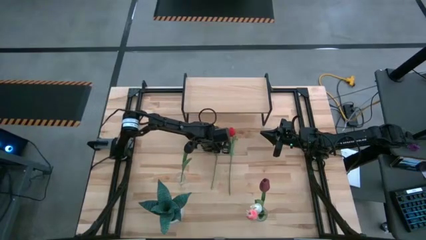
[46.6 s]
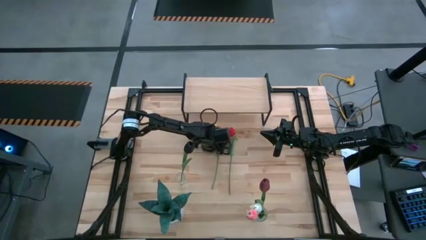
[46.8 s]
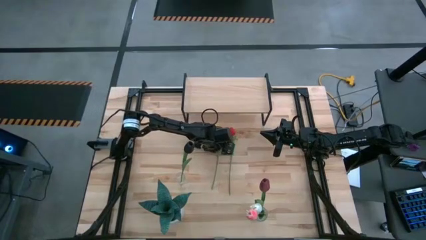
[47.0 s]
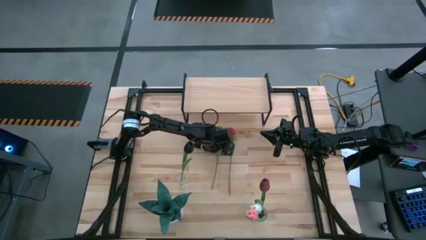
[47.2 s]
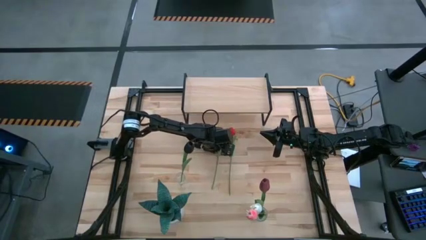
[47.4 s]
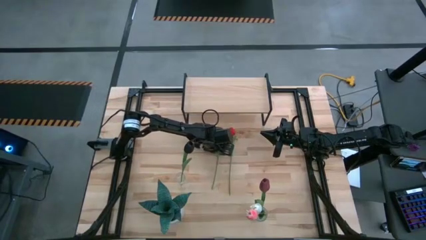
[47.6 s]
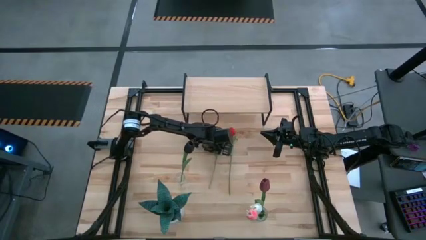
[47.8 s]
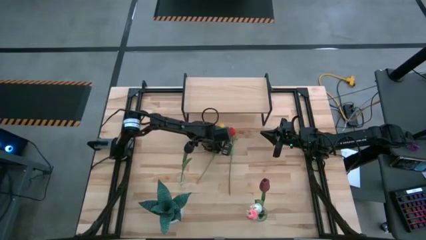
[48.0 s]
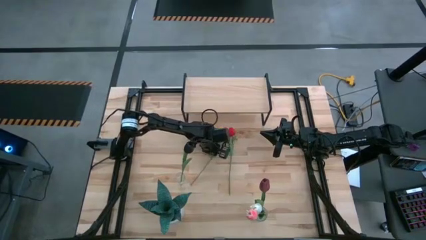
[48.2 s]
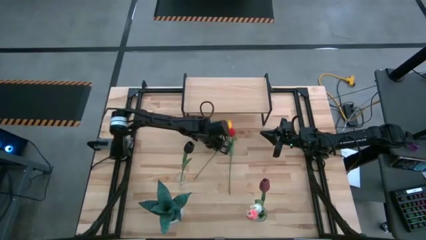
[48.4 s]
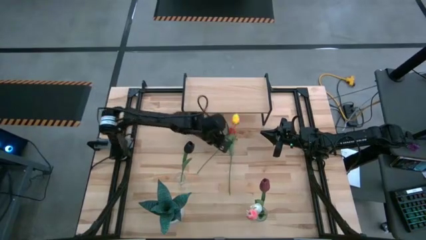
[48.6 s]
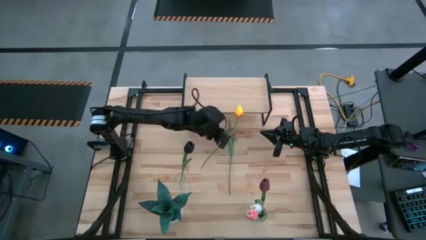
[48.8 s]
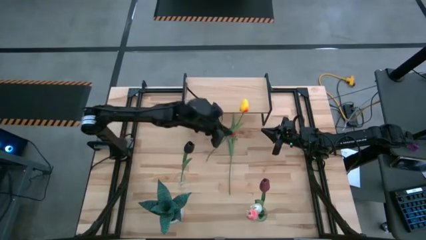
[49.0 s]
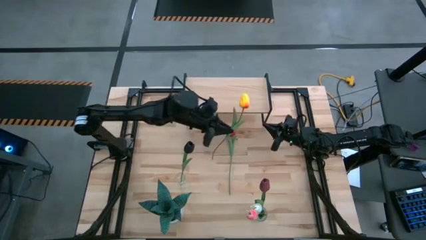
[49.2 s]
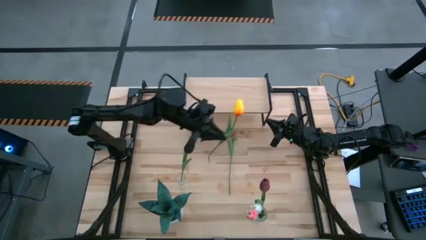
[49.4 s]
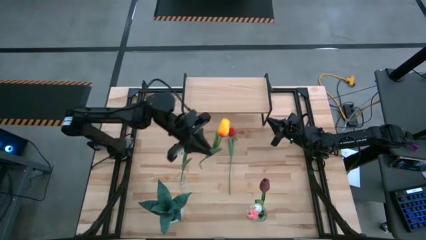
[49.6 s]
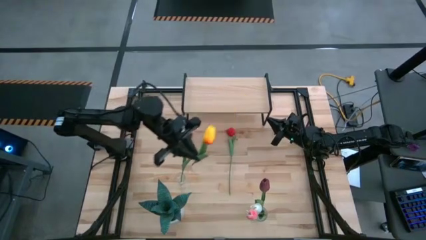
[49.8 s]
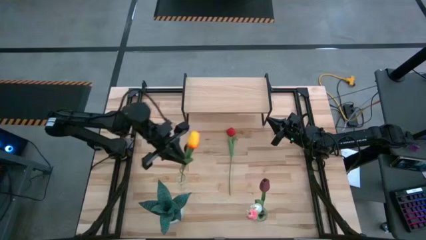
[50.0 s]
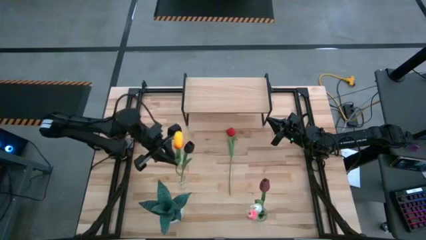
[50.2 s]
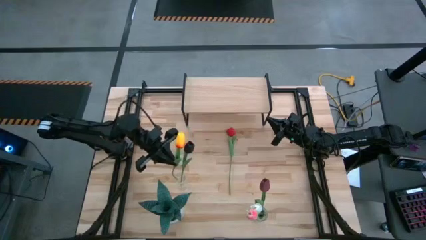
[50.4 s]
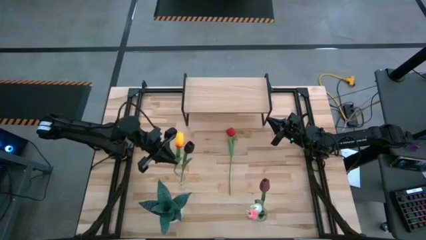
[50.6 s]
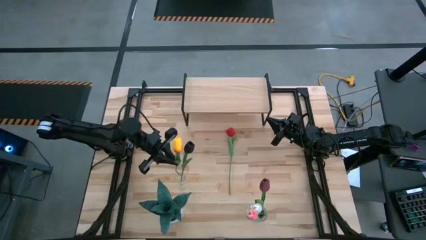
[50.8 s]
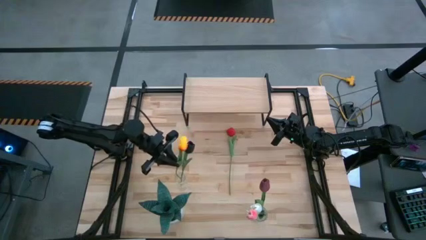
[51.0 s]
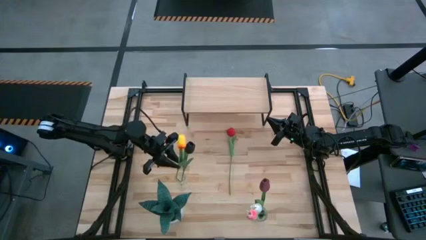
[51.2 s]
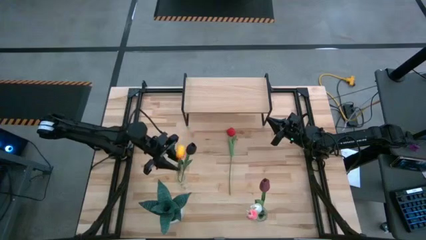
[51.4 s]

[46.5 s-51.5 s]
Task: Pick and place flowers into a vace then onto a shelf
Put the yellow flower into the top transparent vase

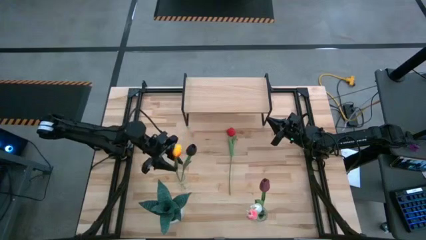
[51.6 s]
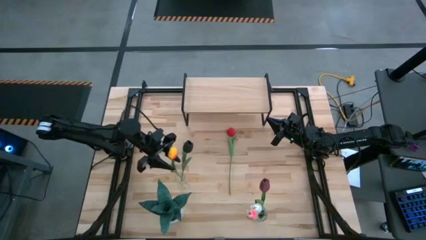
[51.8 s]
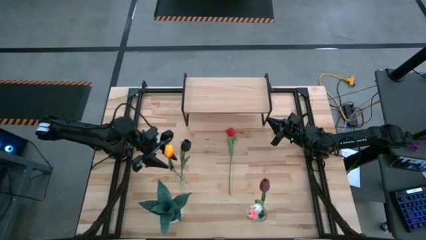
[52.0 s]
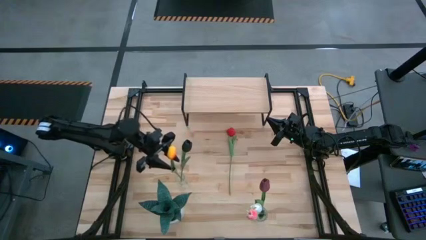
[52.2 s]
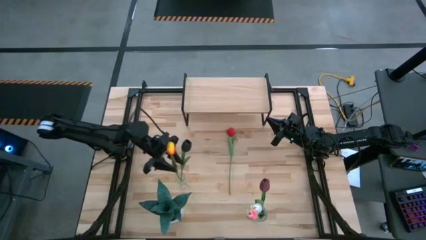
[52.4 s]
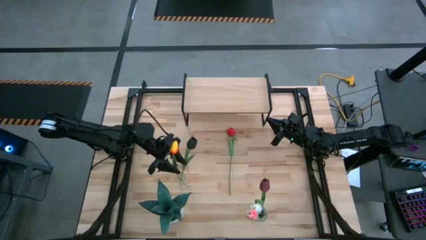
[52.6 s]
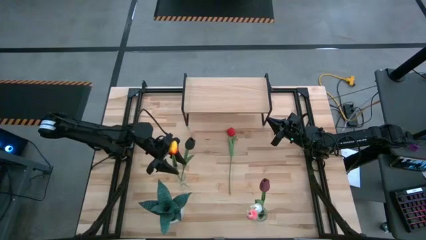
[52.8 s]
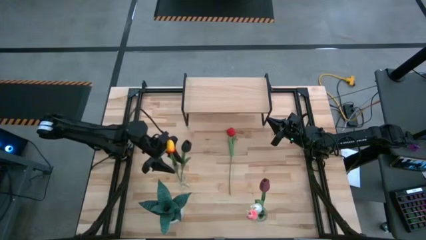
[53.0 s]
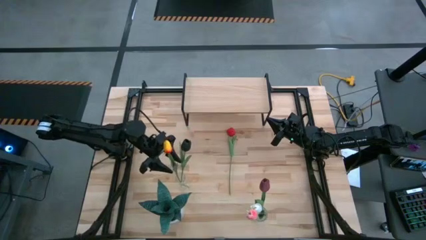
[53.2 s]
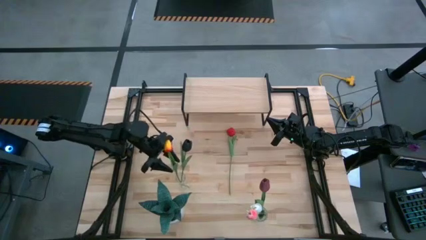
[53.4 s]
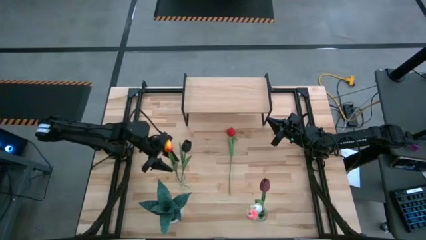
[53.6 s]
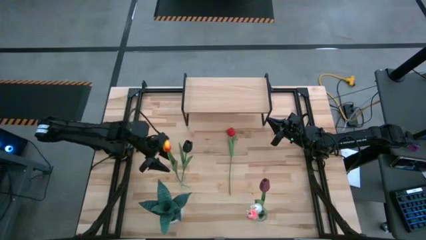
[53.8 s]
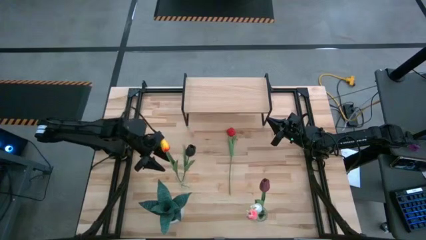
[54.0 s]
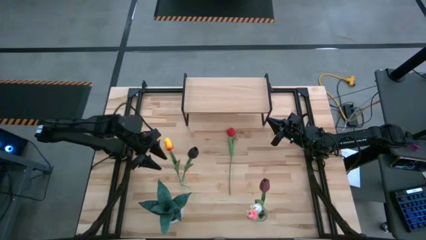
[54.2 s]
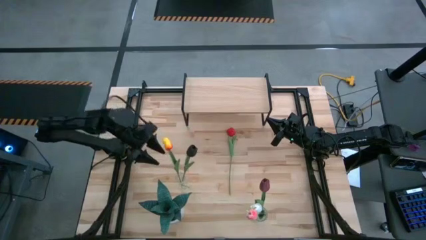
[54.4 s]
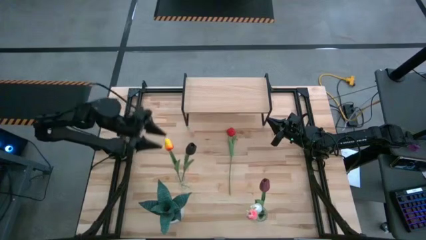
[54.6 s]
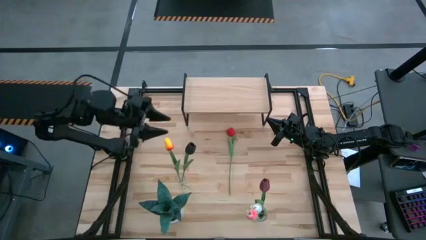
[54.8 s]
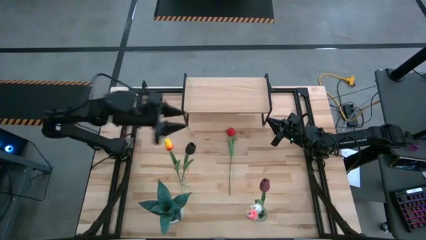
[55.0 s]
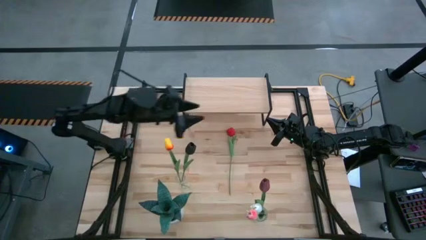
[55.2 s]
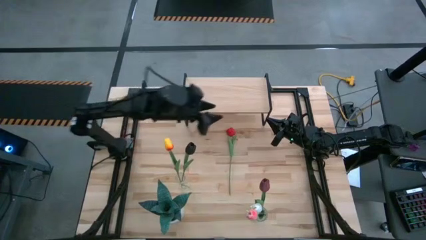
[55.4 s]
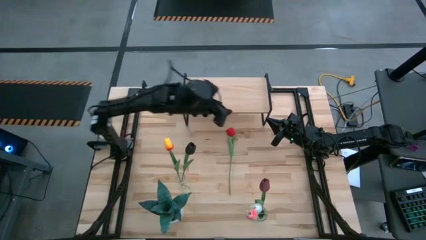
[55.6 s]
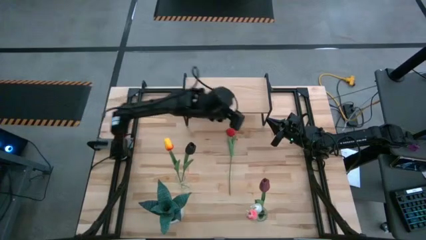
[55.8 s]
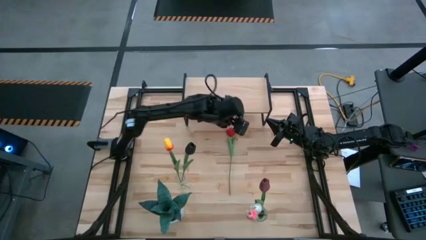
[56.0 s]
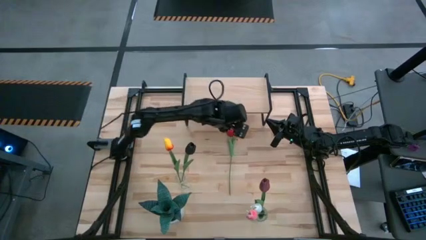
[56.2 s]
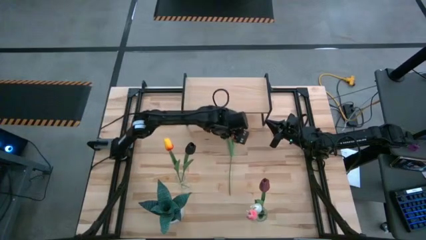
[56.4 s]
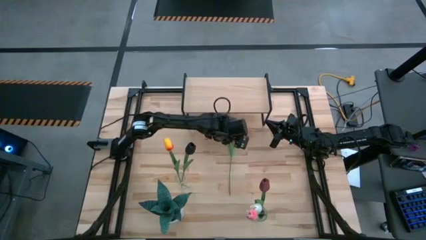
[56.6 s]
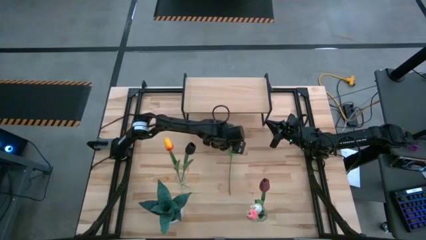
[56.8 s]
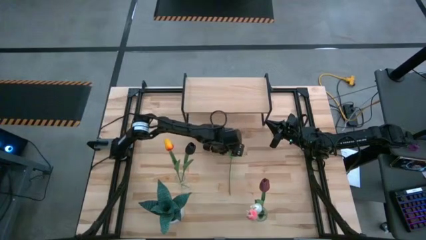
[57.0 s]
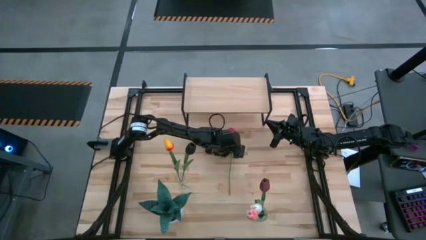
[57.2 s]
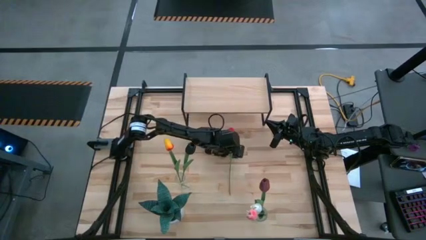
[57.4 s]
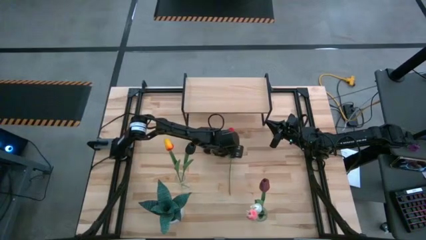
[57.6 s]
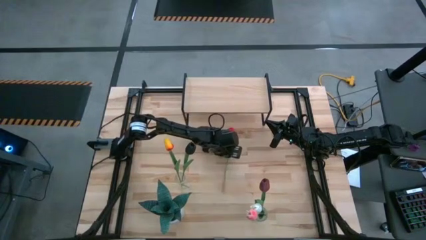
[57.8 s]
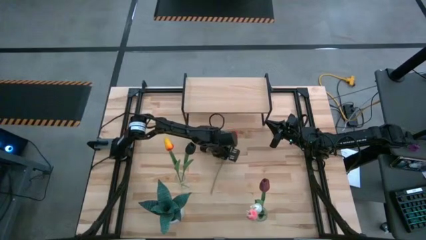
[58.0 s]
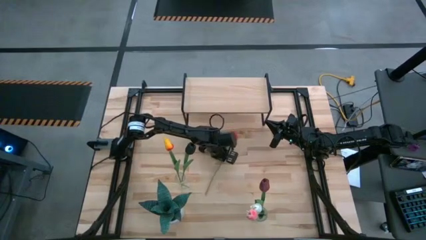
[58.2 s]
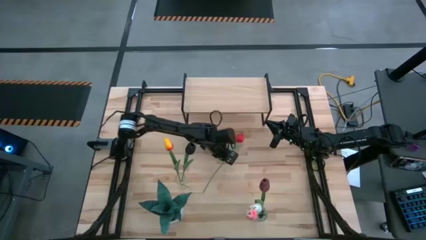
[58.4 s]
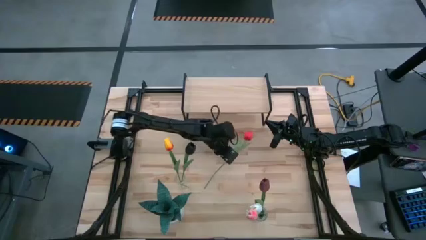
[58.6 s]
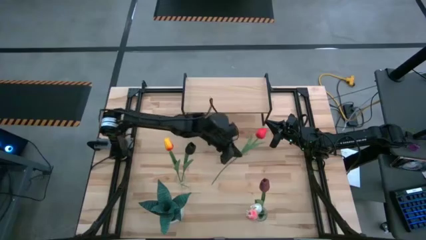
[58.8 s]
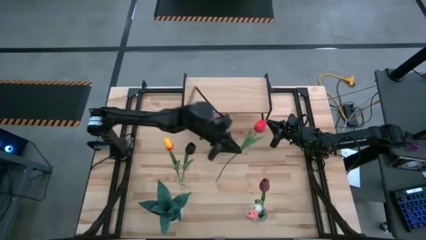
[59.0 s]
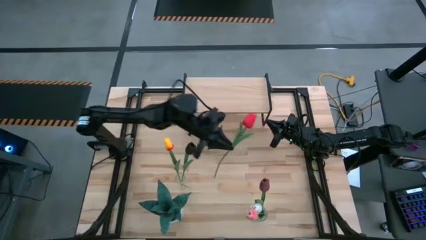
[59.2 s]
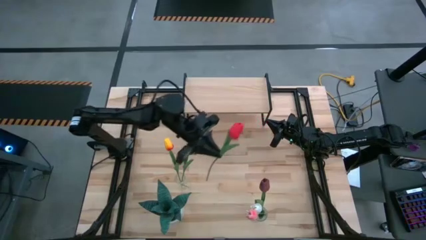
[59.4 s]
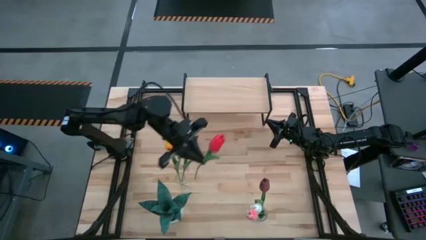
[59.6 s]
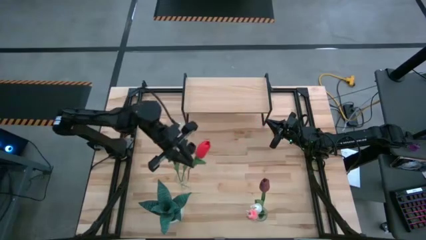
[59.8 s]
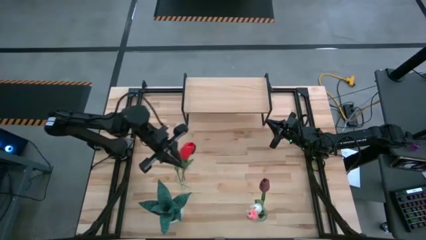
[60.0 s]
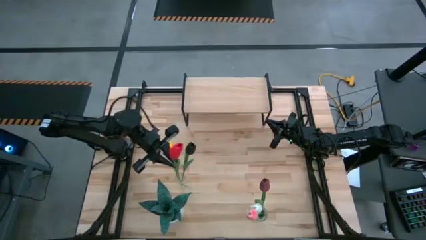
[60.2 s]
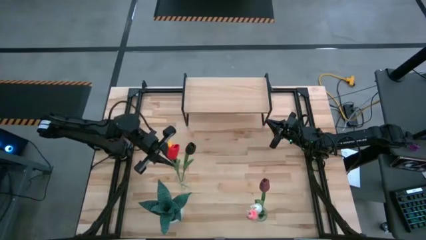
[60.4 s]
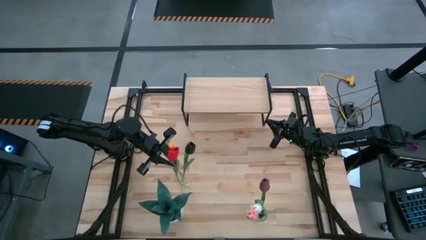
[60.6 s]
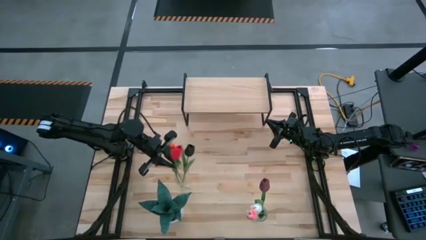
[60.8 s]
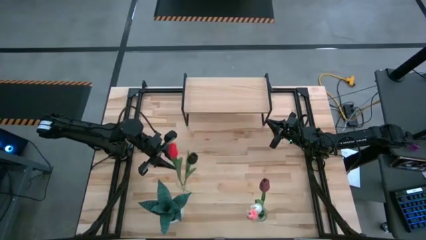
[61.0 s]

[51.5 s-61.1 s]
Put the red flower into the top transparent vase

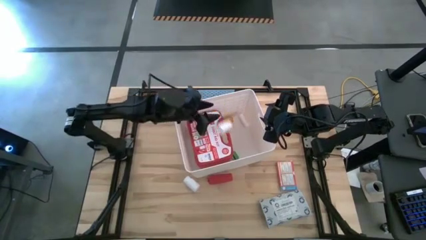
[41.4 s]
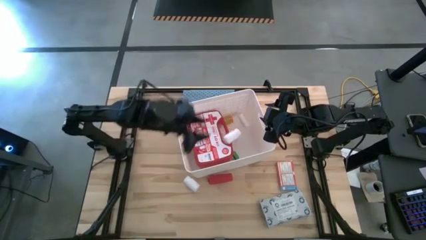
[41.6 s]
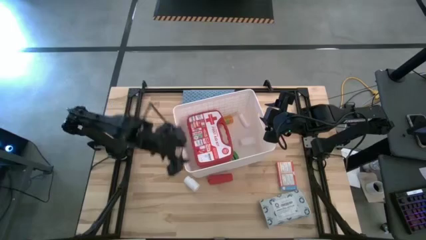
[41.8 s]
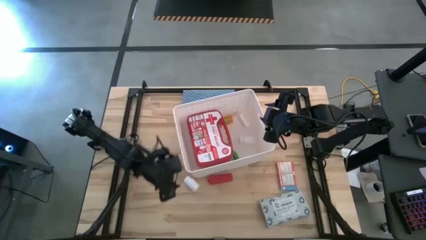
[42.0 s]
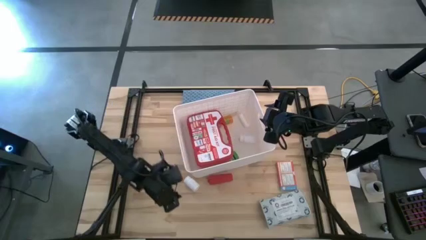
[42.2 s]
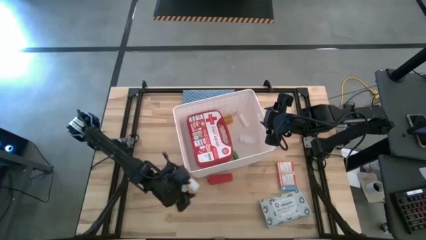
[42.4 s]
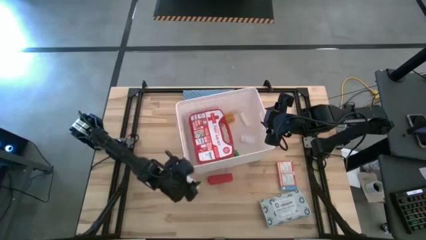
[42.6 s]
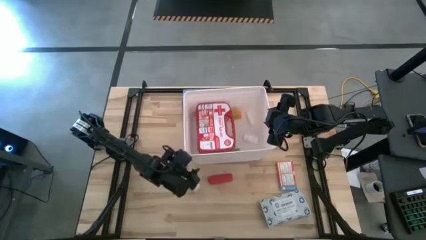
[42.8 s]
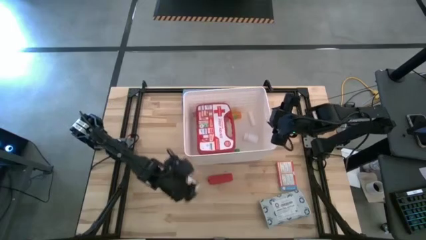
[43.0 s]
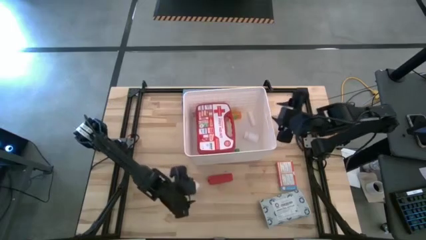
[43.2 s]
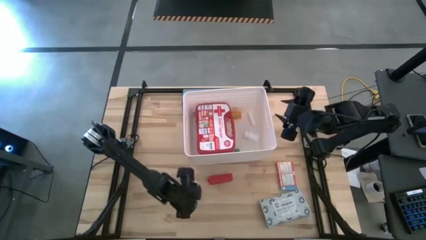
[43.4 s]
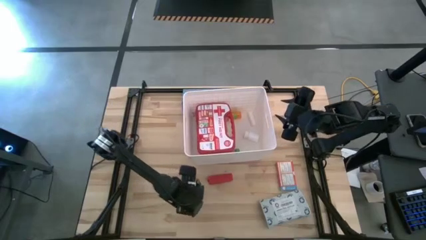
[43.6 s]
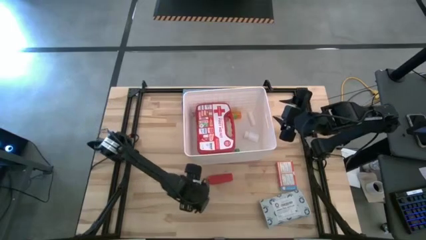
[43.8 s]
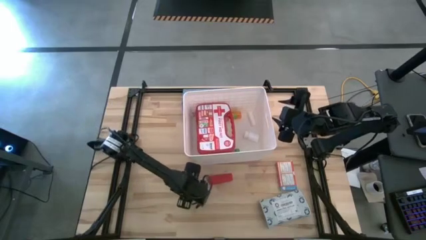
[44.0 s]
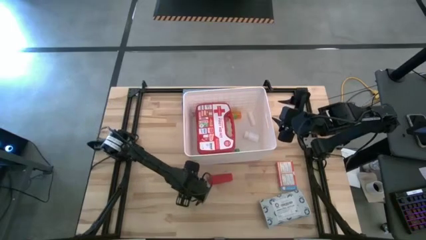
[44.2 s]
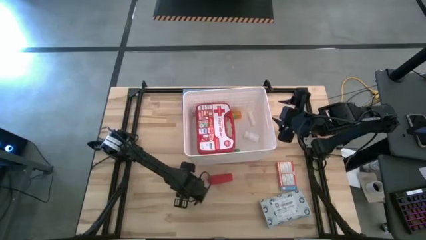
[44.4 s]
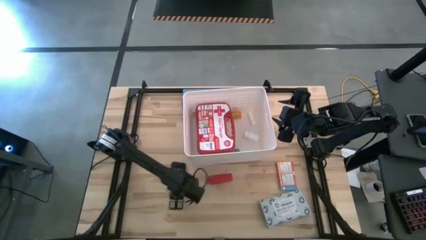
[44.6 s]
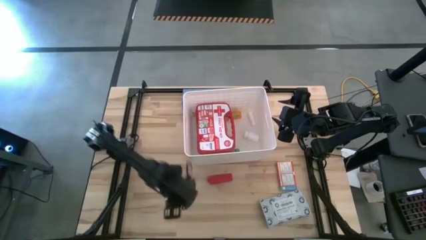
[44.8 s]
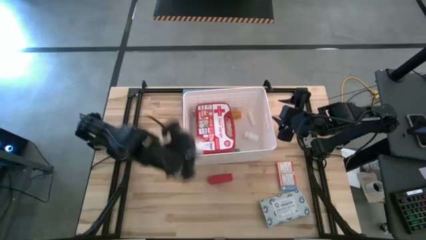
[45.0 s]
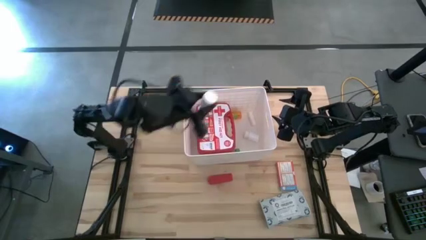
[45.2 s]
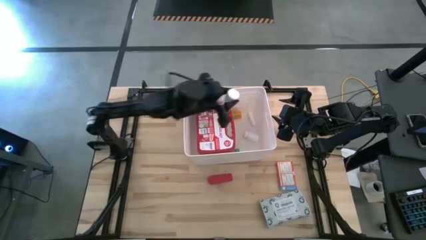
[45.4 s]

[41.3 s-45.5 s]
Task: Pick & place medical supplies in basket/bin
Put the white pill bottle into the white basket
